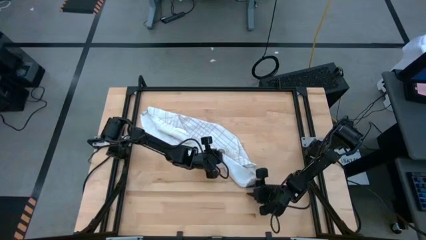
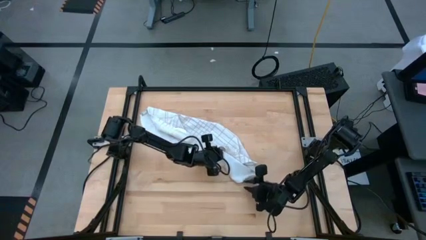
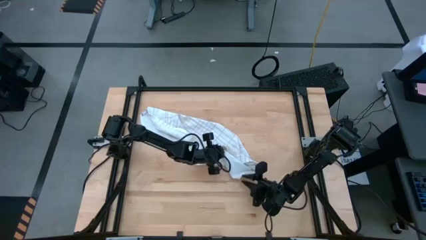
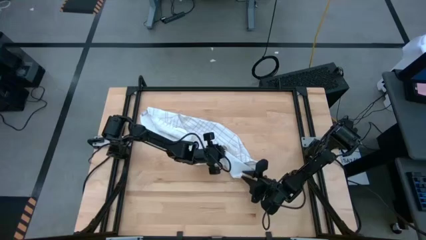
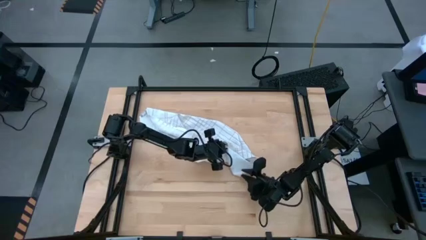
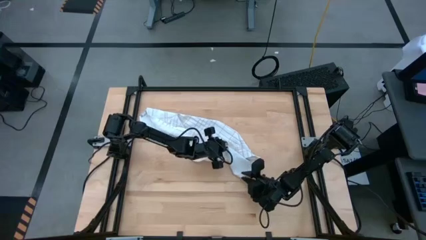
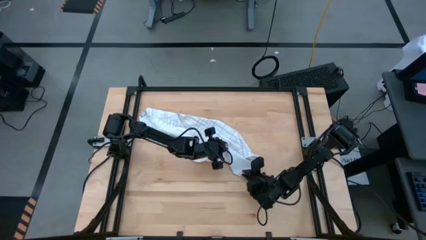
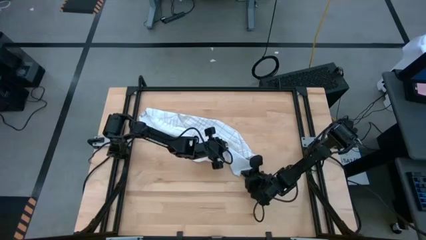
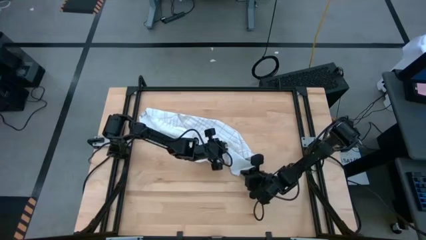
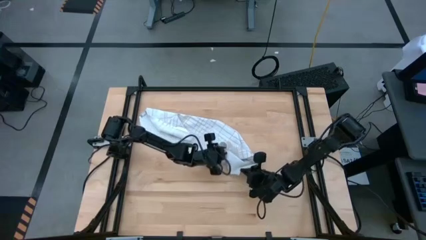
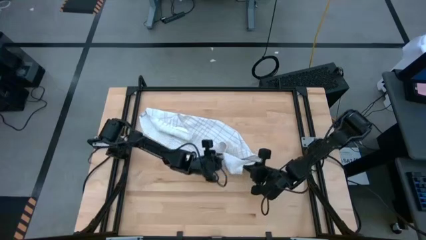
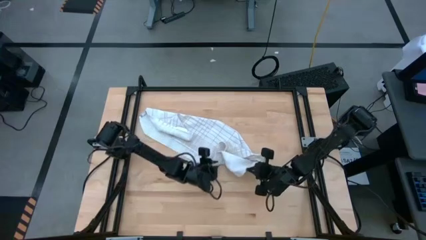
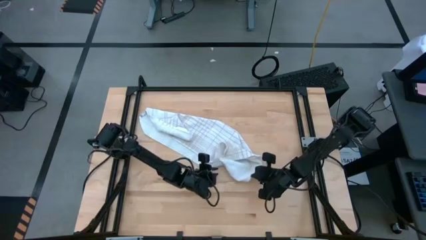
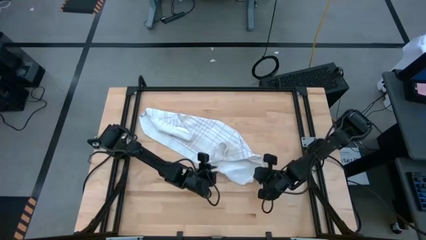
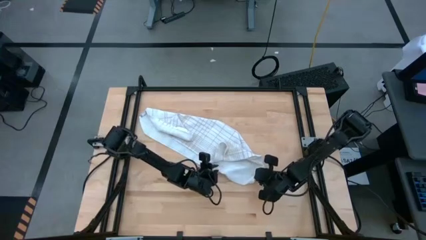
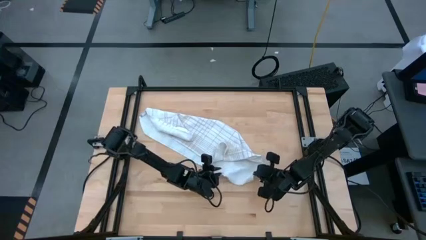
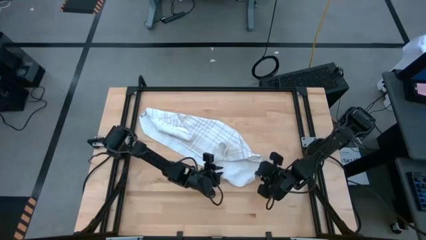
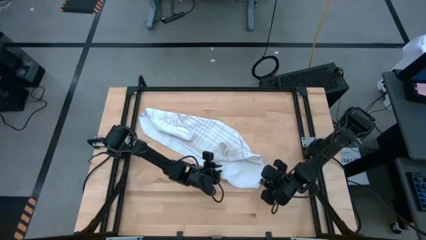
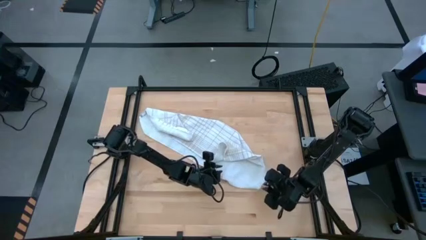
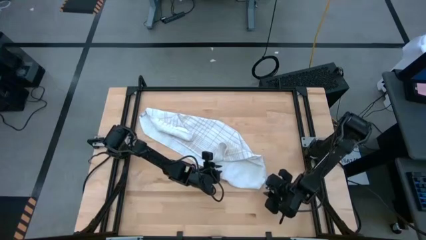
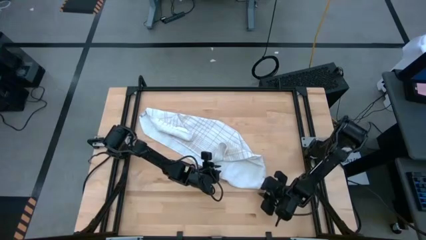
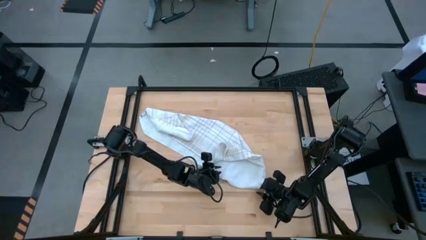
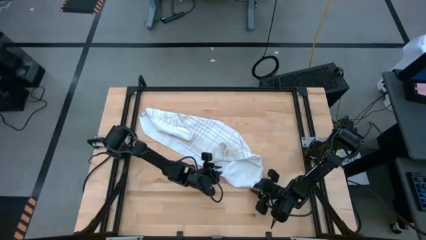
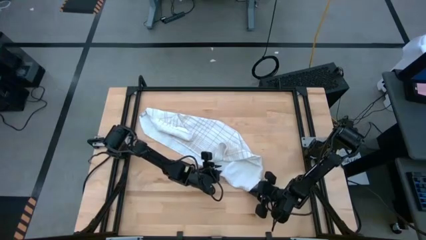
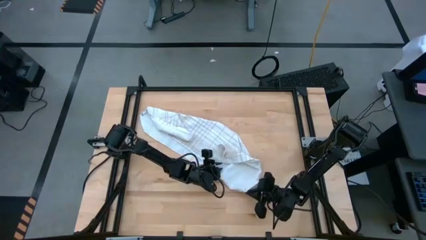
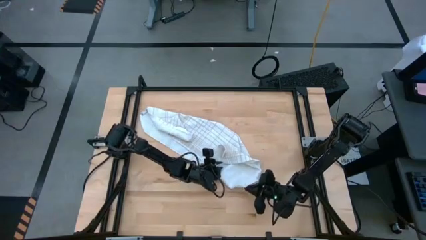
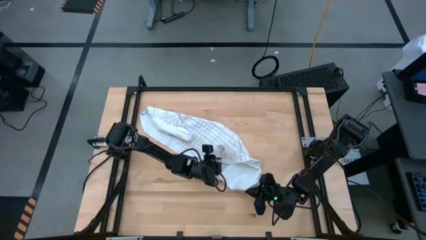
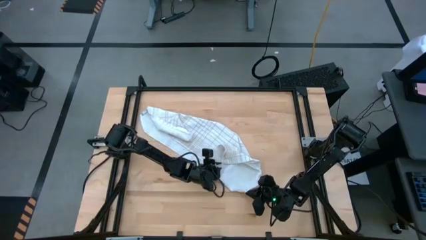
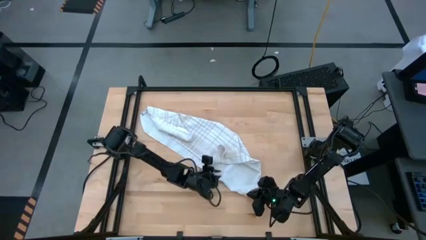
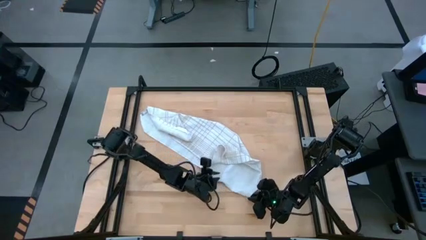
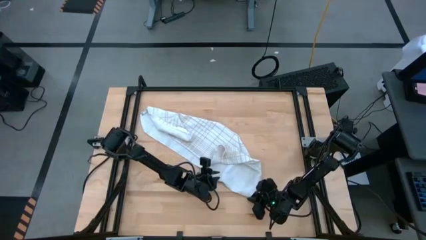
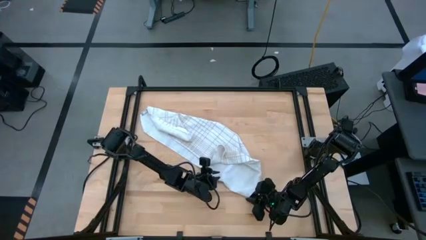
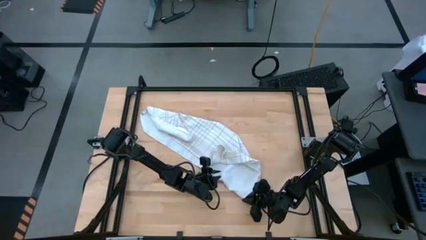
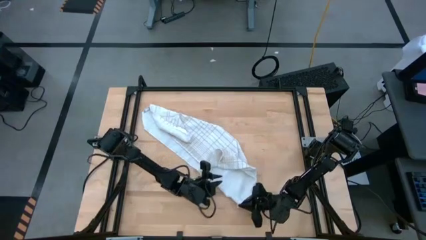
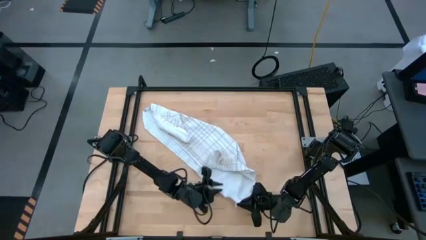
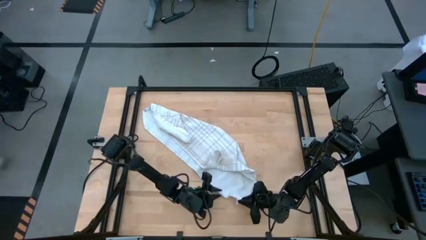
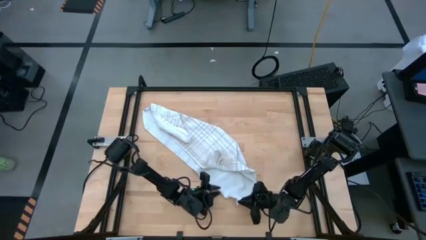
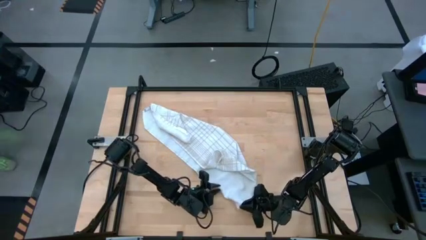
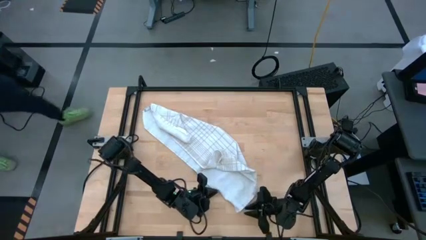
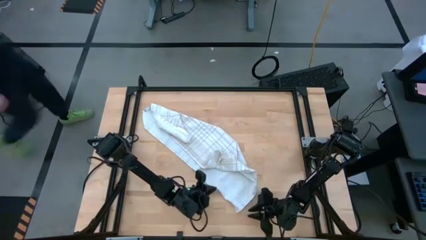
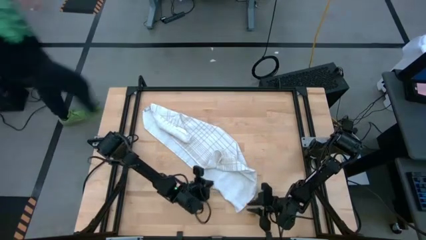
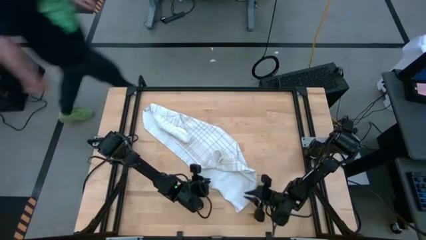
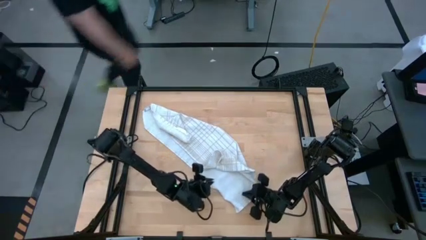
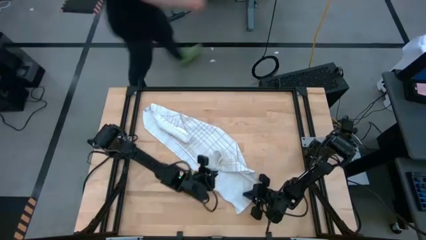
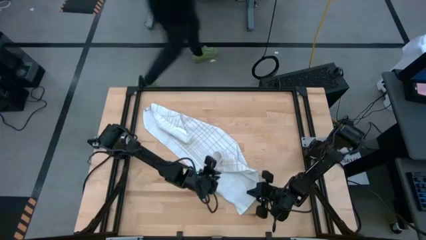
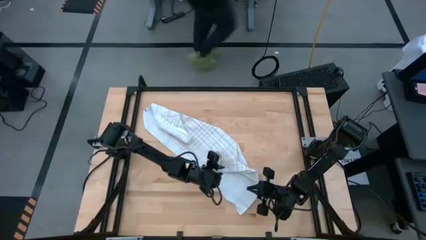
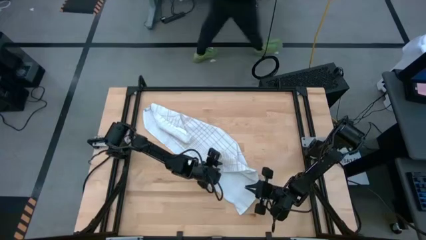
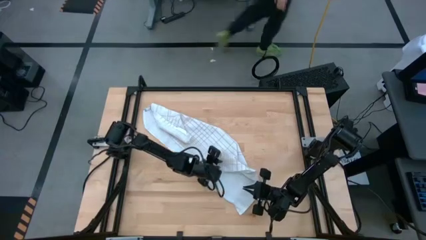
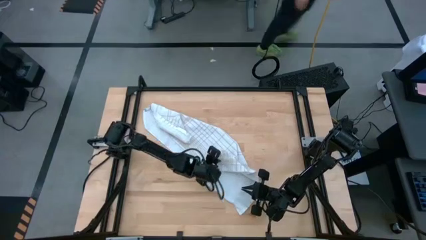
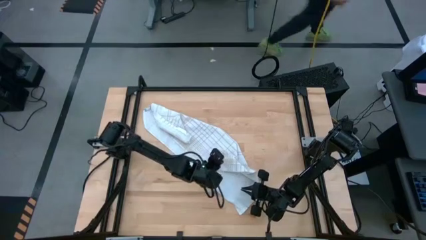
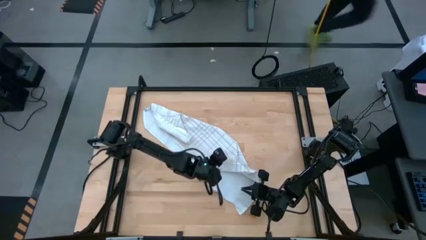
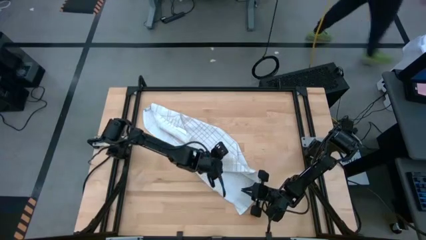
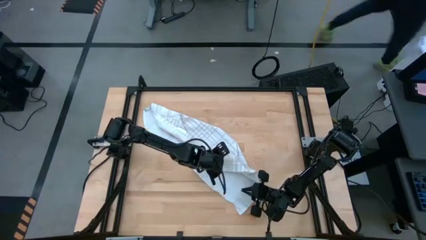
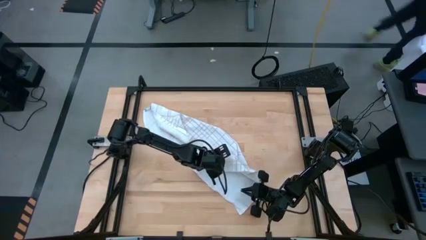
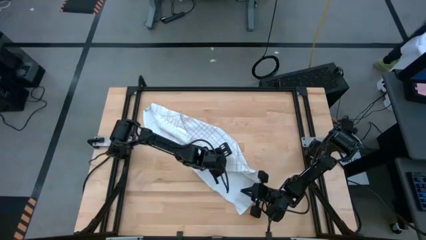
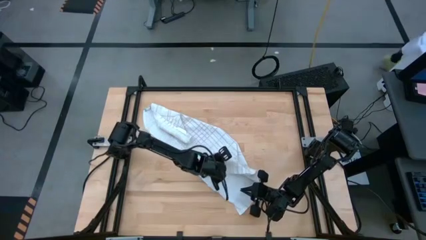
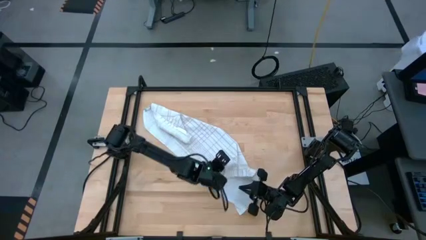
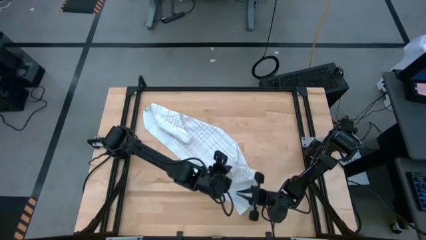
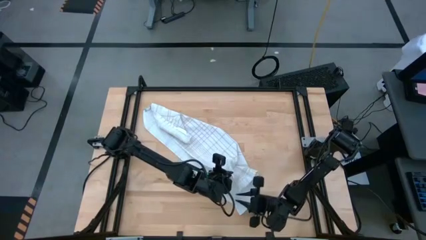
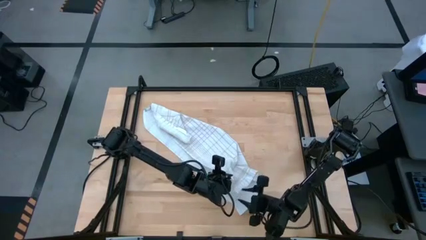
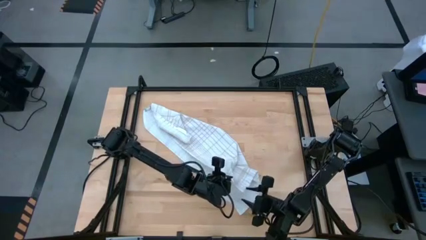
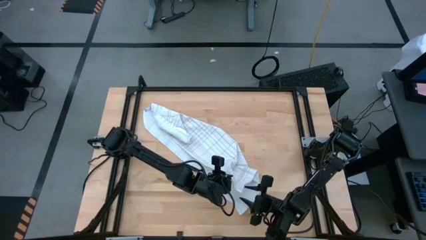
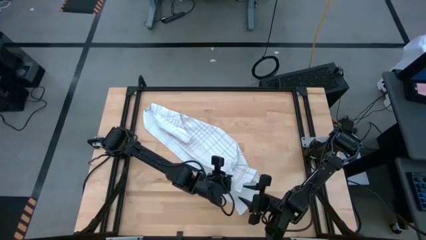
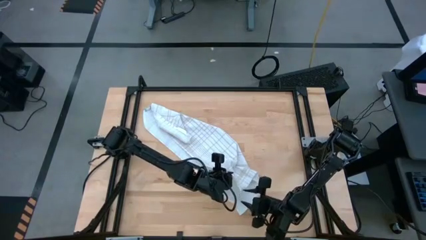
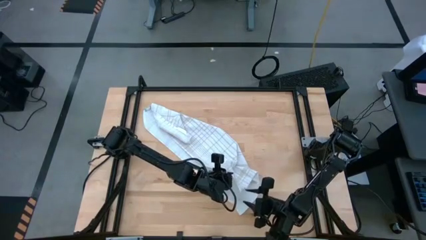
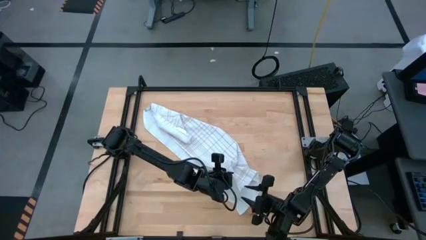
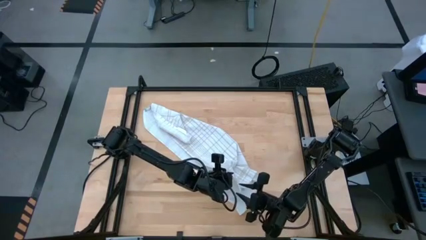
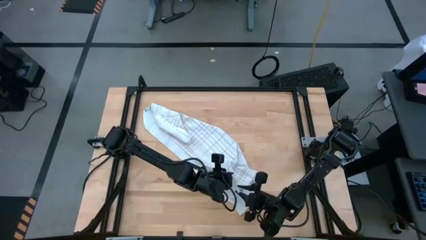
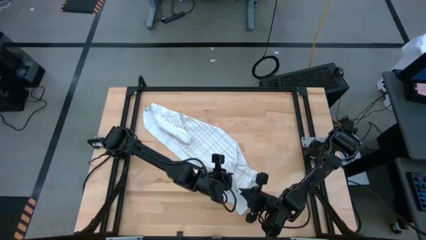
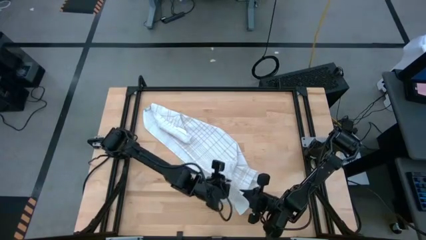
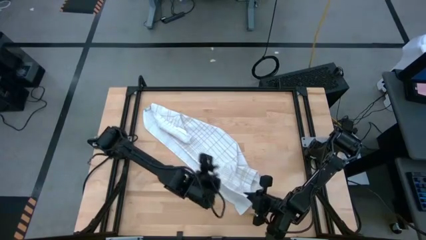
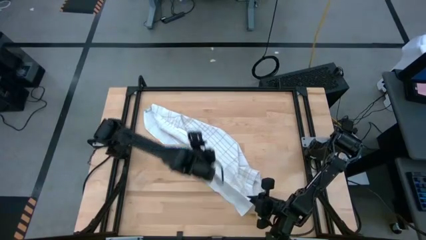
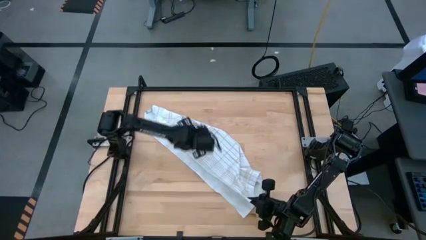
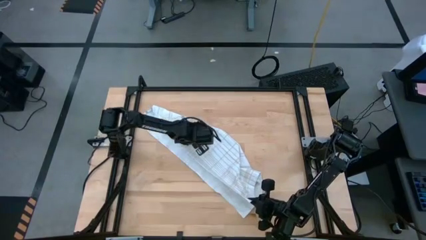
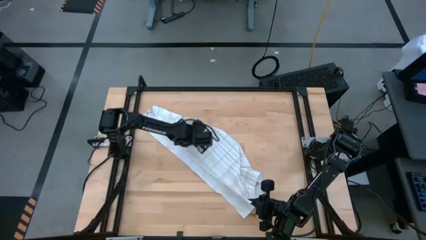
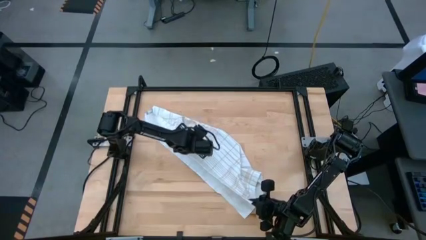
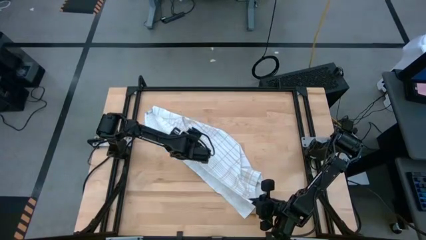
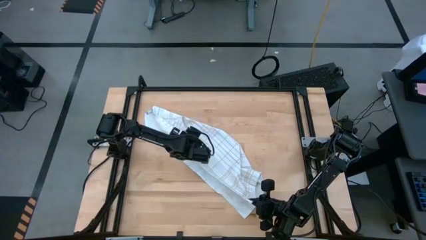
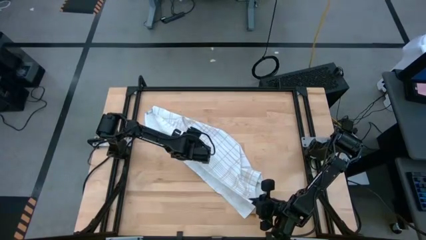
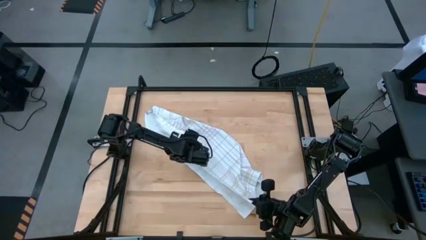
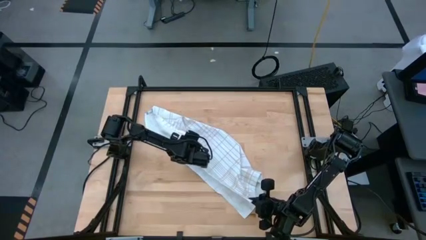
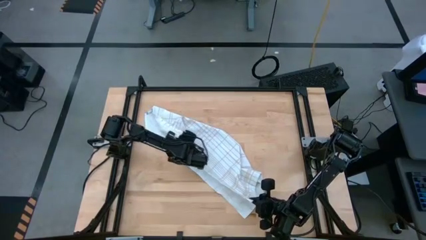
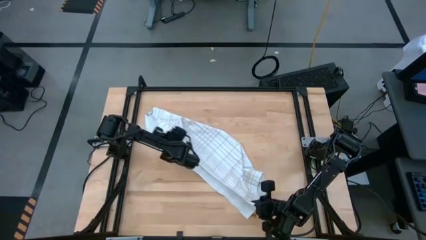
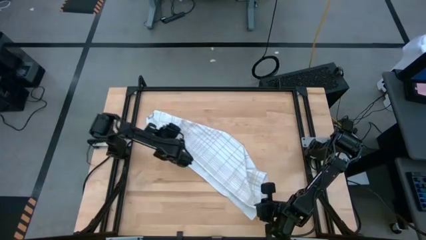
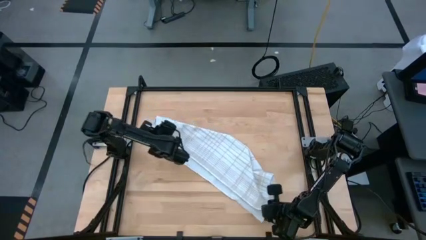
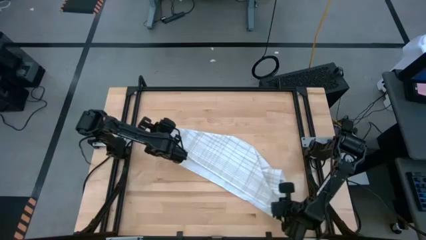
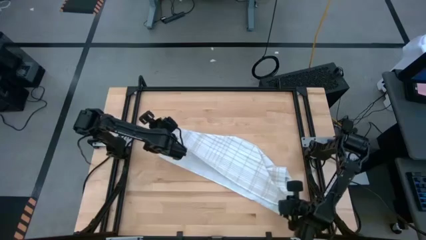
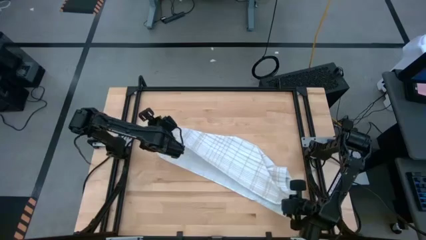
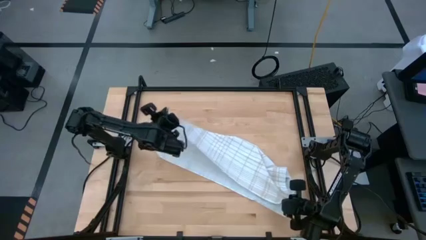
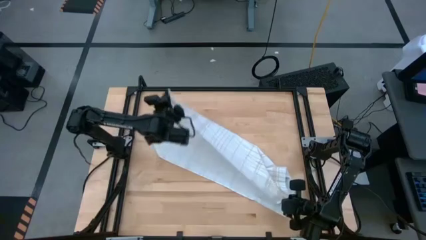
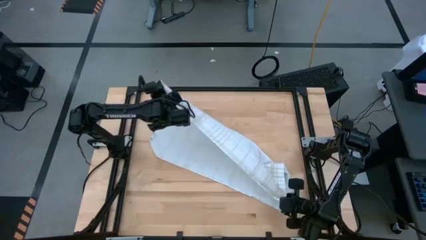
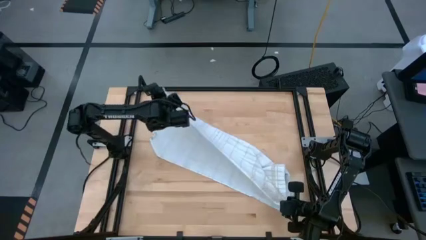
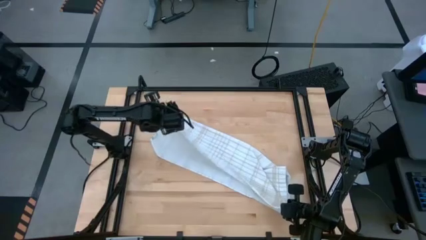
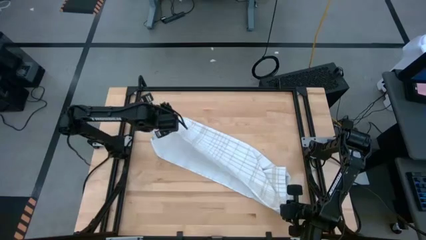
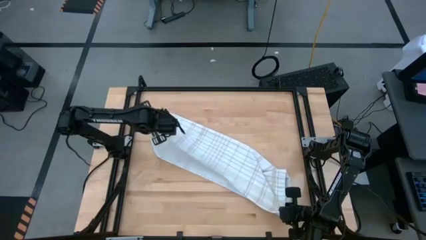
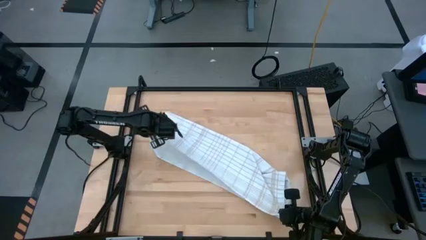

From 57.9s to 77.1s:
Task: Roll towel
Fold the white towel
